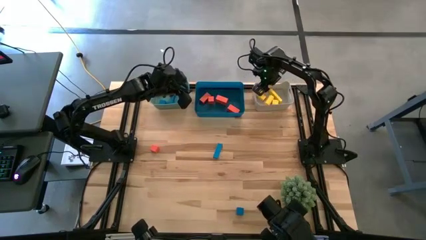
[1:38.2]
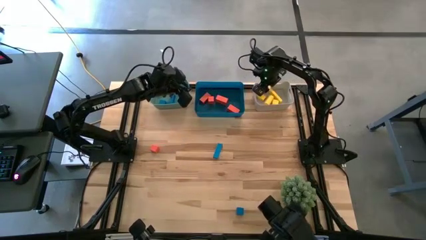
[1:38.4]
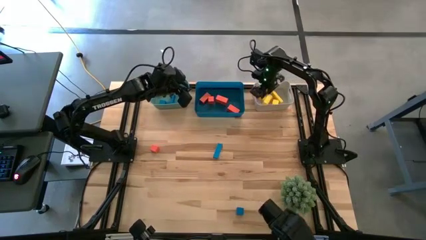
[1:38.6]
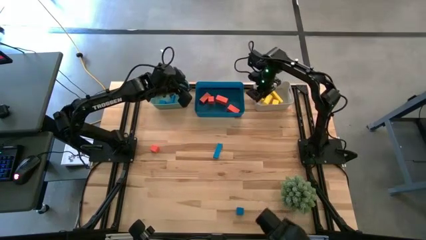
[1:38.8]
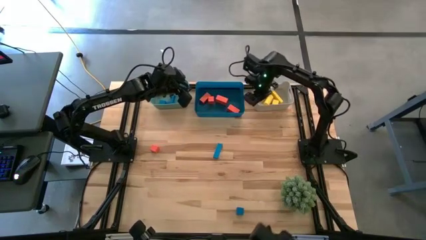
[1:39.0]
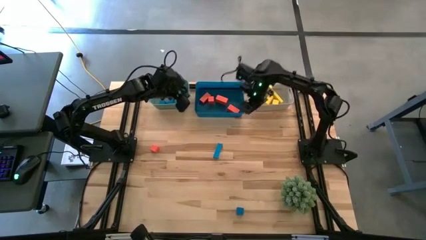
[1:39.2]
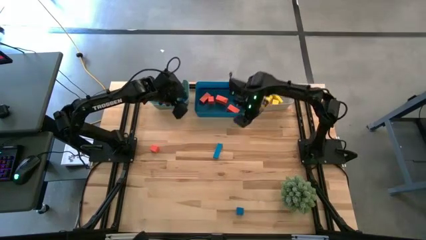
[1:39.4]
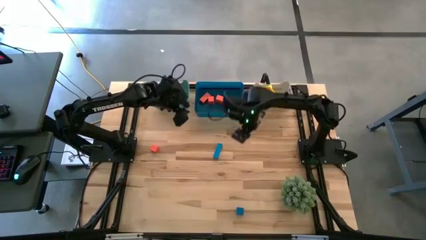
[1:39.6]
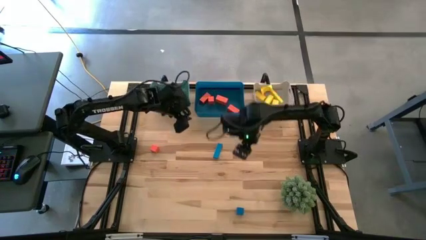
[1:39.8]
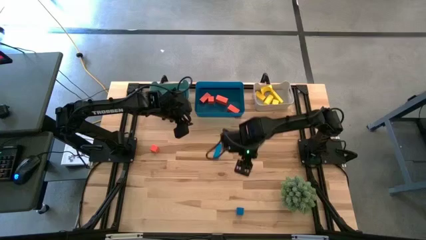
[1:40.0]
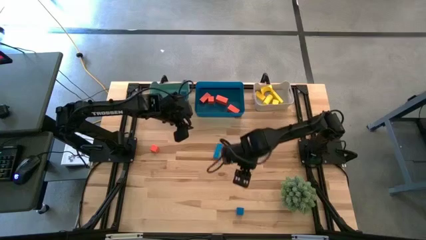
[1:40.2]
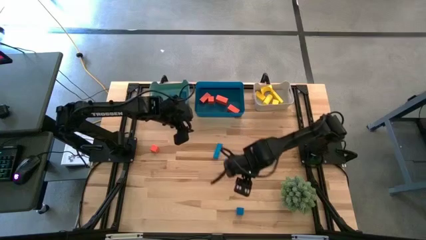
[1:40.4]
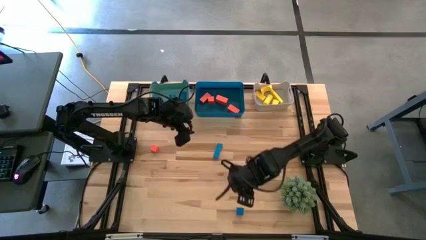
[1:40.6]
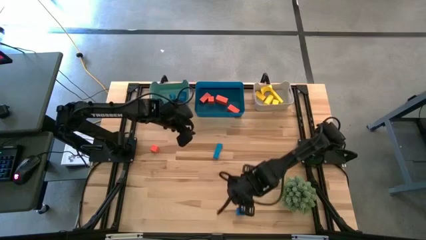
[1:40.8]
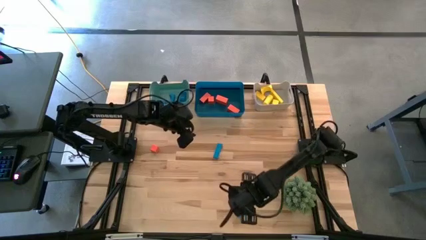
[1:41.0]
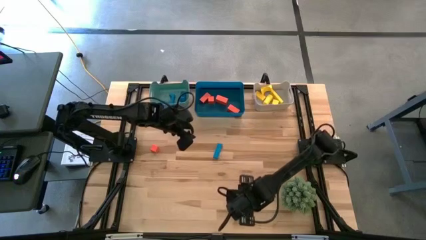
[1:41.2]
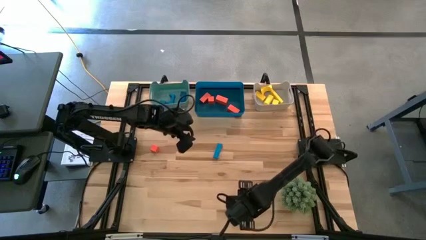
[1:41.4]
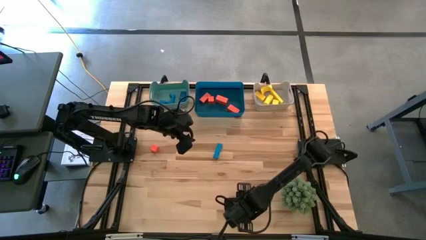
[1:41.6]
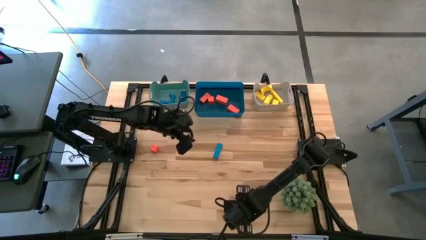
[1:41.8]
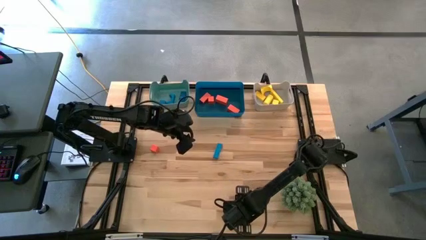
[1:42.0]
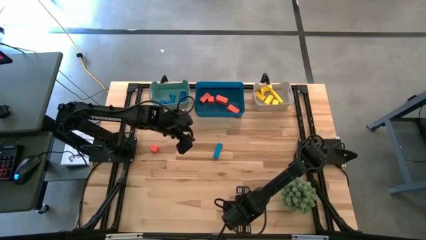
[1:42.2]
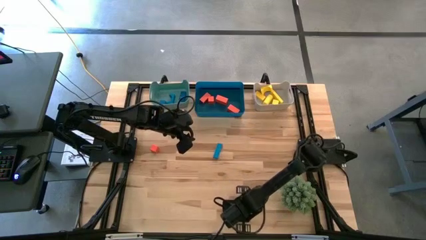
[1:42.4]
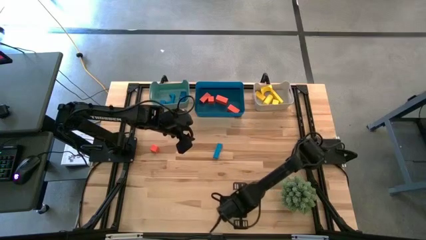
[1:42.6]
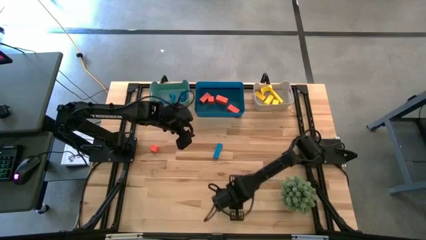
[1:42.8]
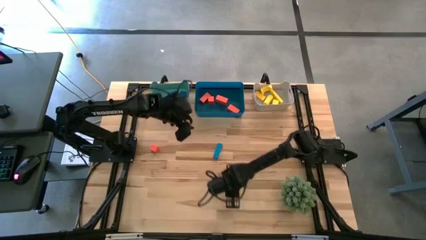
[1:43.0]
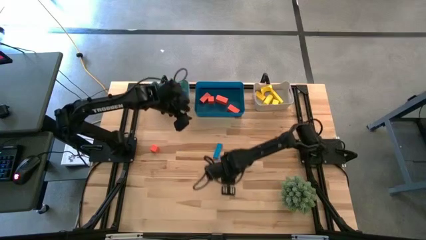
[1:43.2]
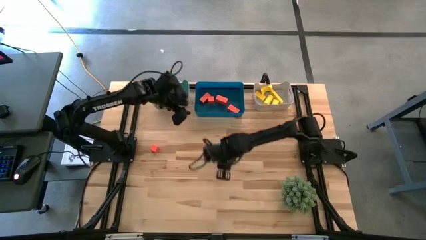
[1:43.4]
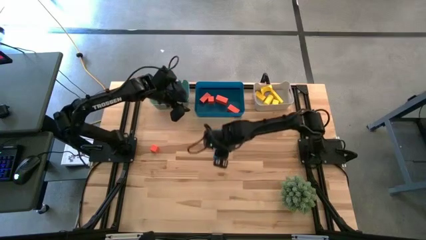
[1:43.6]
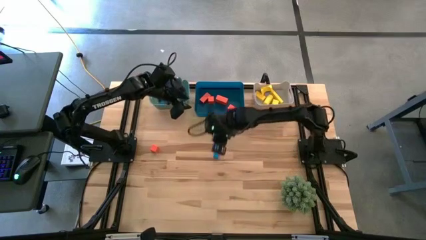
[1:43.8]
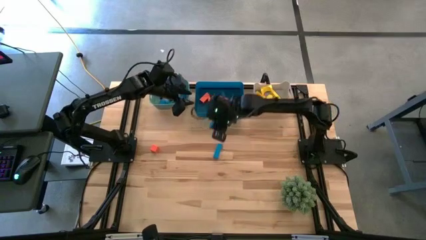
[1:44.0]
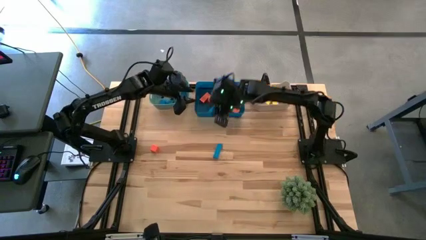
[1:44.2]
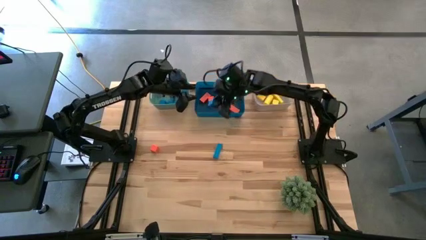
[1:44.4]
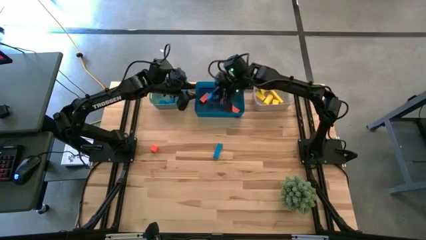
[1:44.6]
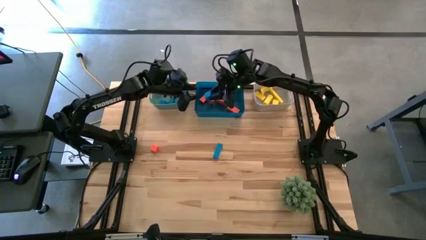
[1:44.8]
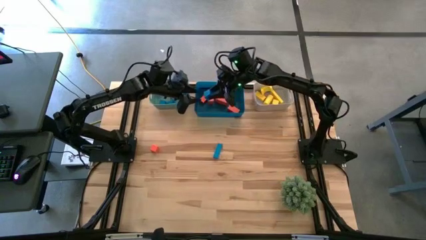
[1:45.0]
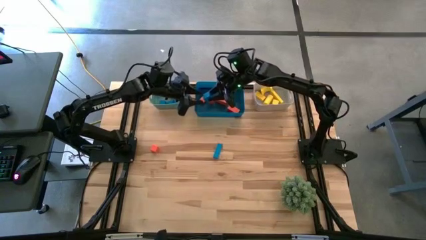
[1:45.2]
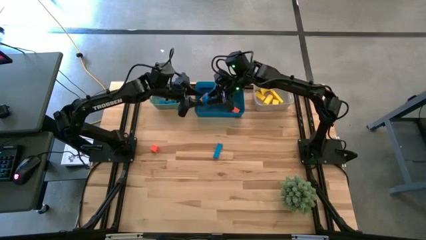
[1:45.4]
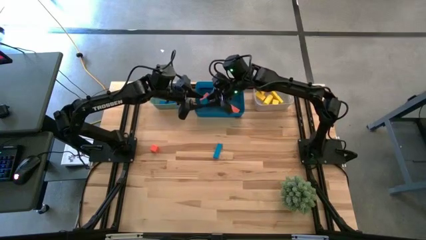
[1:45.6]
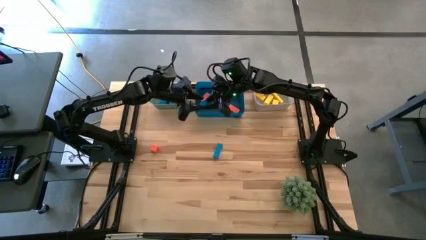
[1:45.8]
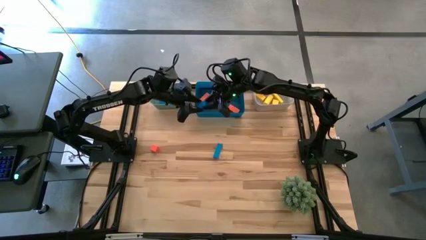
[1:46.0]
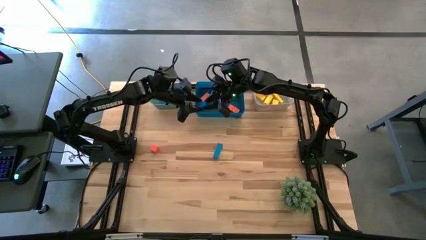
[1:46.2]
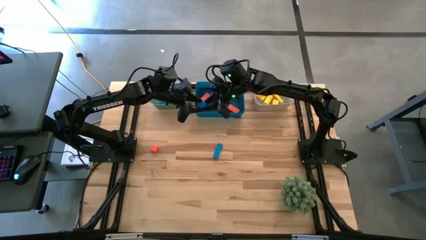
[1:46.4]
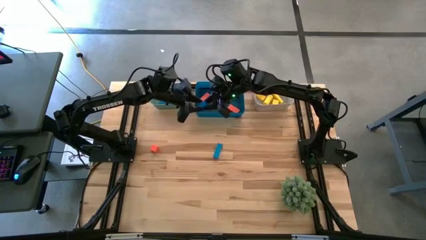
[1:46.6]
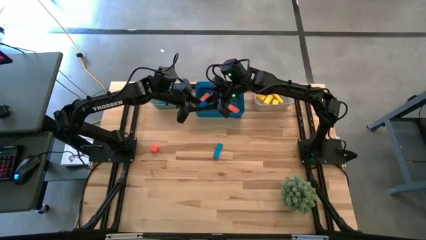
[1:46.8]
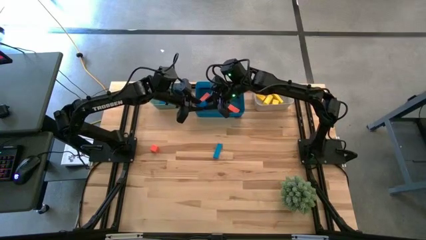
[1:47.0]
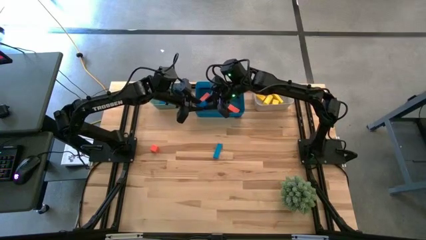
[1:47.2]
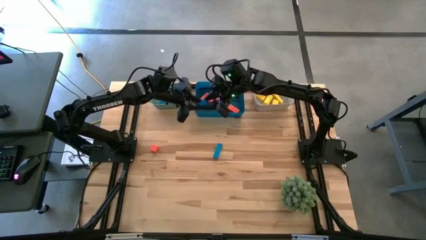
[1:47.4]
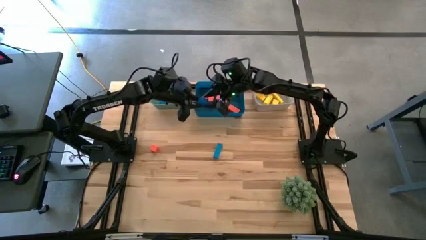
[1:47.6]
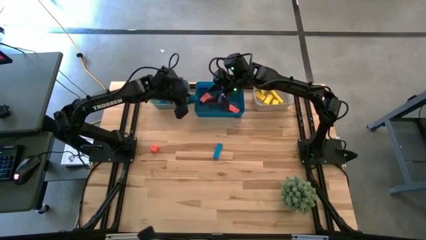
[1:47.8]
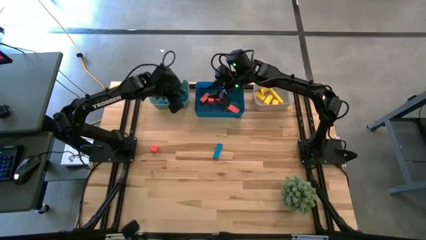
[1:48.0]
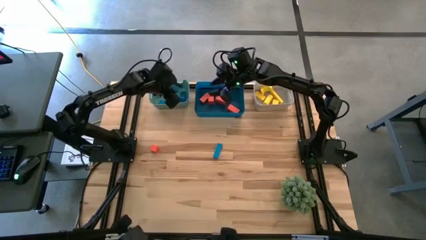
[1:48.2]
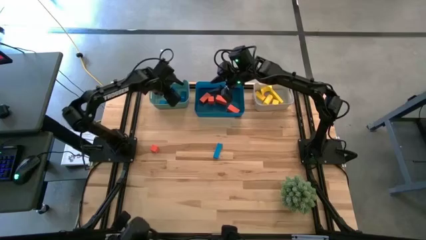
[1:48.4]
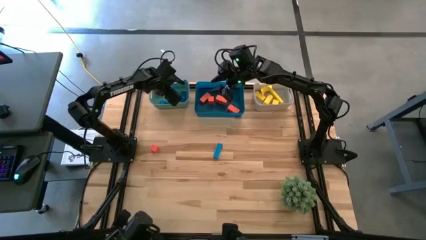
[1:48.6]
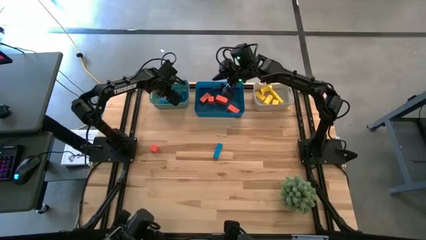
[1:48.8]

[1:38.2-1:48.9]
Task: Sort & place blocks by color
Put the blue block into the green bin

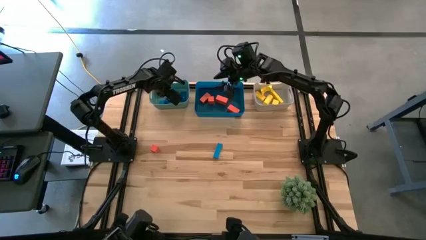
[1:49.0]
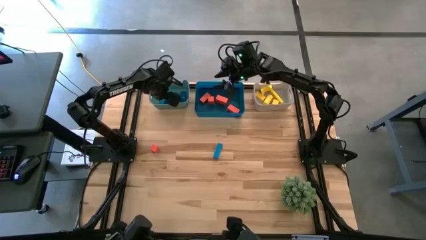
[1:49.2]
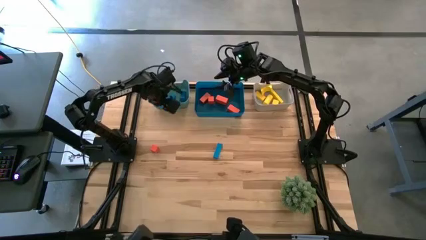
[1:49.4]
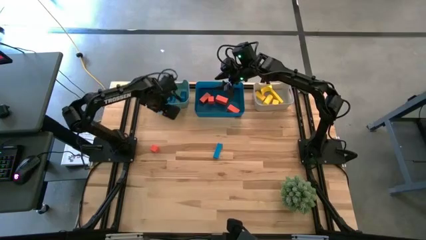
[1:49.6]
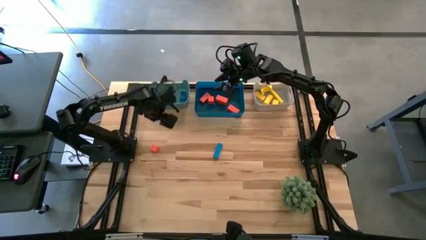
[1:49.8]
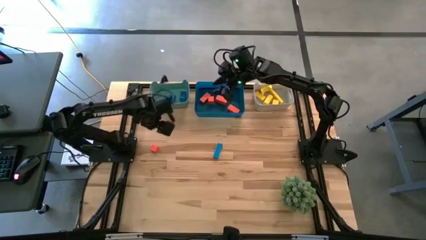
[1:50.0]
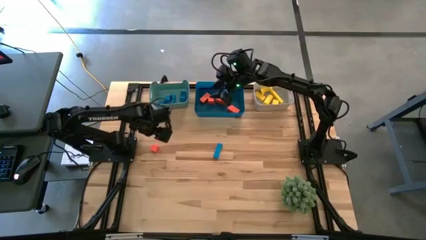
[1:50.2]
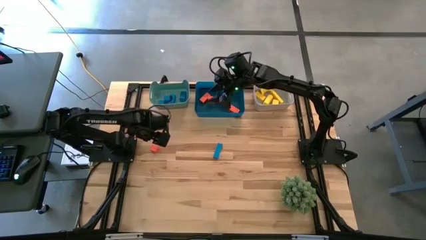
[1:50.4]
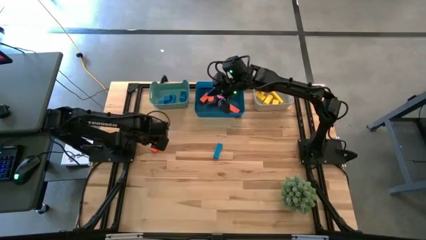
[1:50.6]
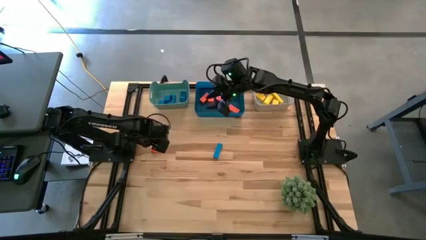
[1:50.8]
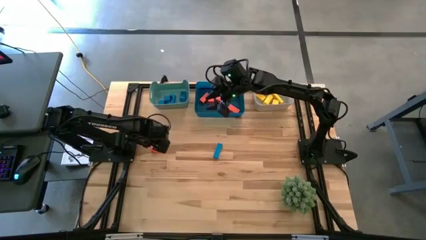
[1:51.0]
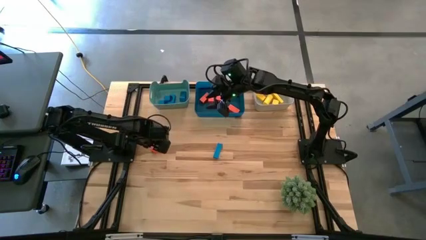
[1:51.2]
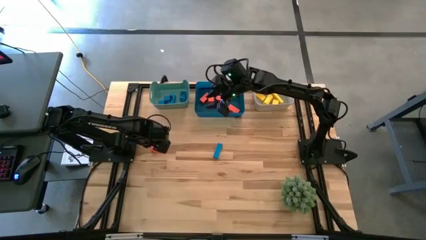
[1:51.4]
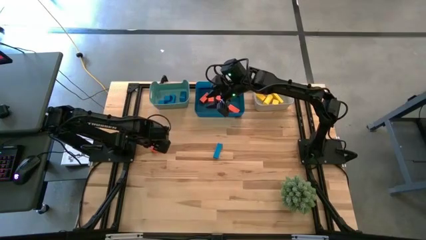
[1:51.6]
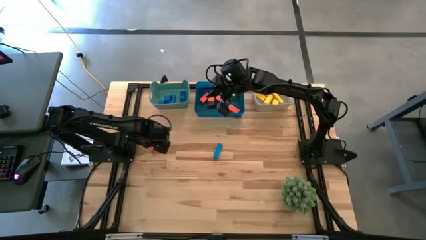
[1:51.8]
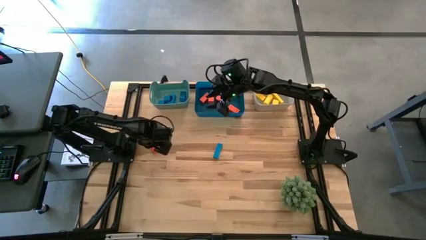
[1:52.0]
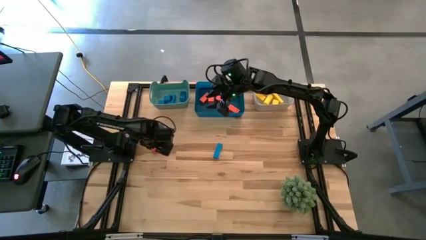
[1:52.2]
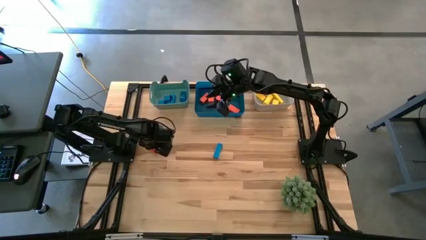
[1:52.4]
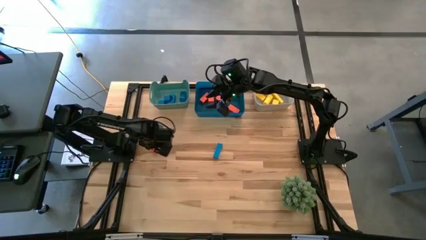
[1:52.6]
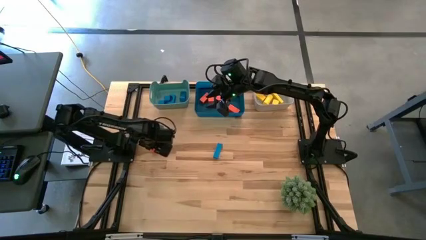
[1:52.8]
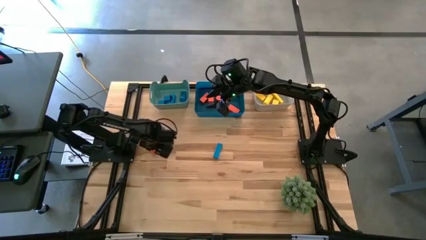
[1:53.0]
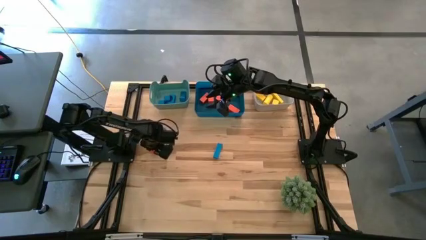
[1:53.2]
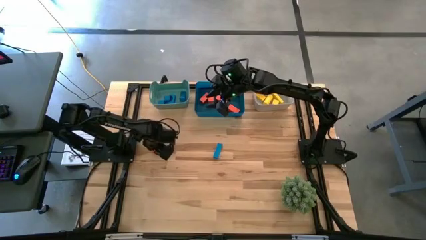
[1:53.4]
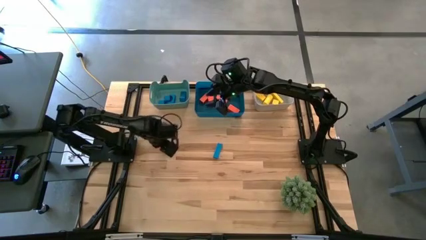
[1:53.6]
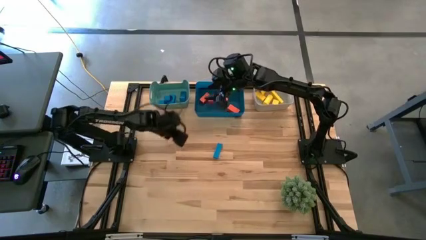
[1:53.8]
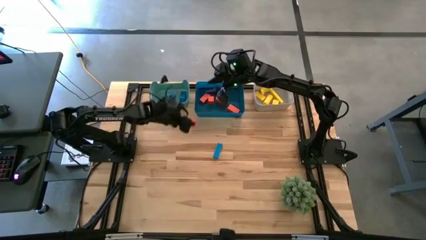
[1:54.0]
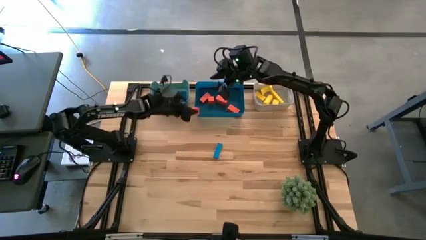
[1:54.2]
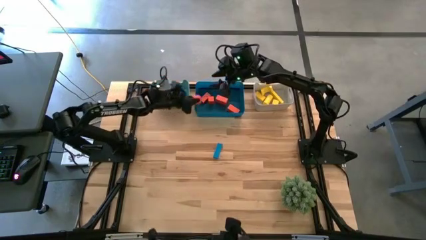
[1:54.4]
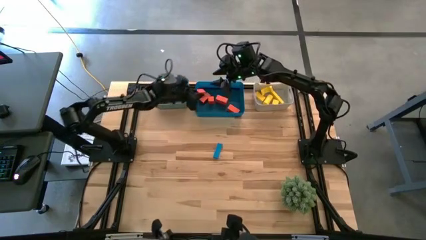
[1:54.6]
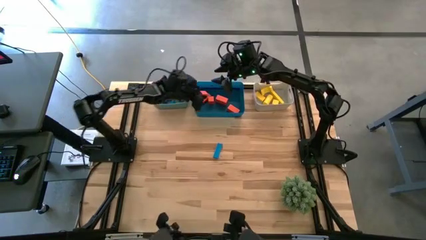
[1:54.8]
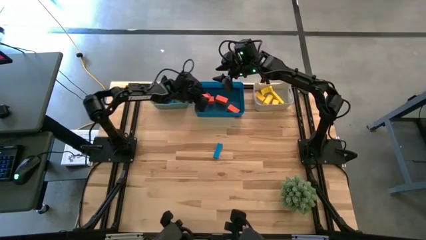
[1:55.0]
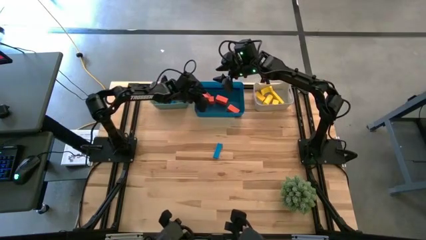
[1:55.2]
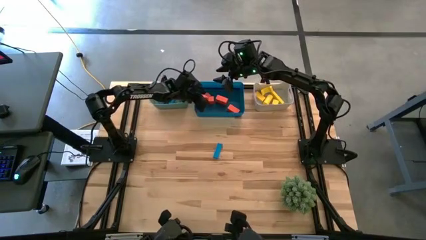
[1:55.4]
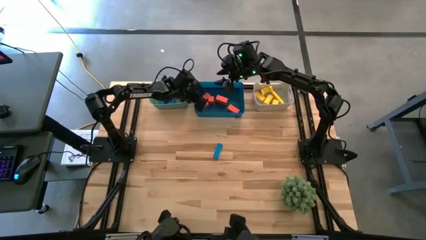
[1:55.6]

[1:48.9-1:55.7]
Put the orange block into the blue bin
